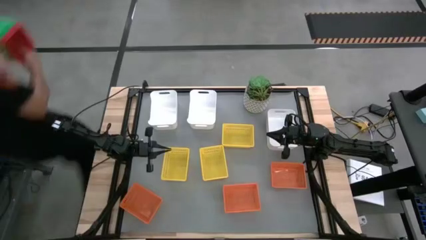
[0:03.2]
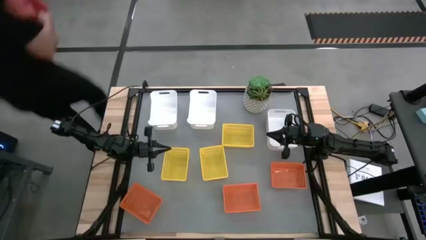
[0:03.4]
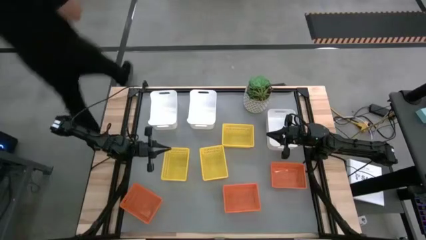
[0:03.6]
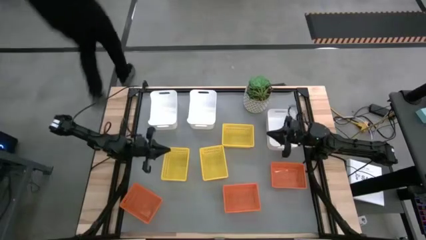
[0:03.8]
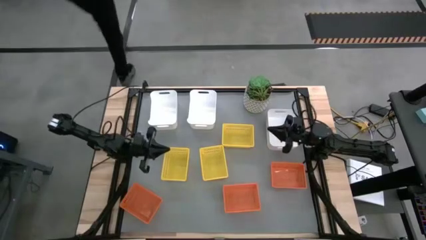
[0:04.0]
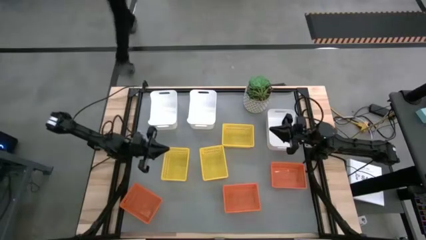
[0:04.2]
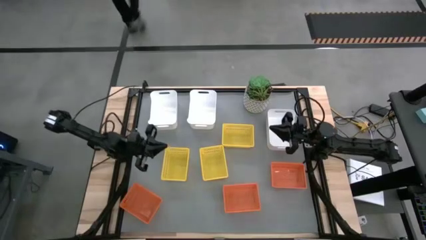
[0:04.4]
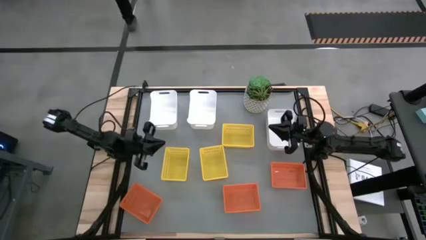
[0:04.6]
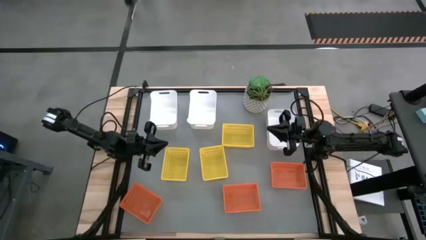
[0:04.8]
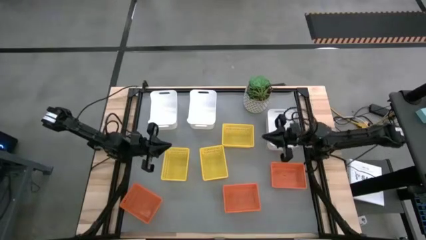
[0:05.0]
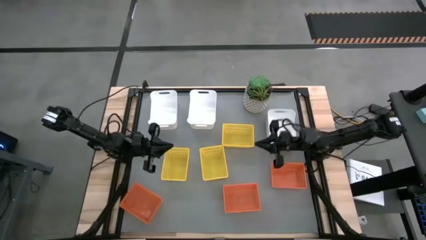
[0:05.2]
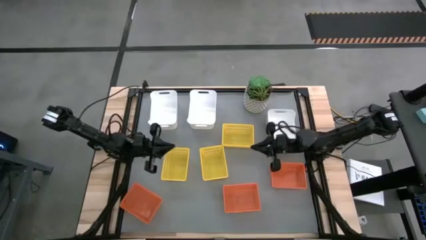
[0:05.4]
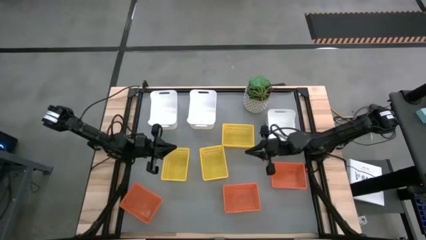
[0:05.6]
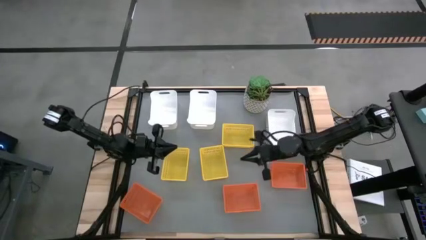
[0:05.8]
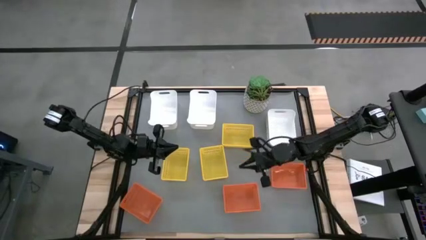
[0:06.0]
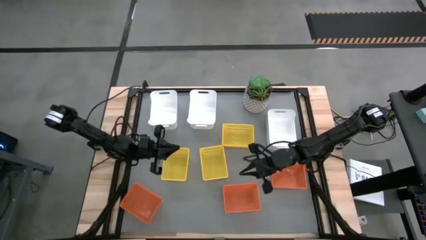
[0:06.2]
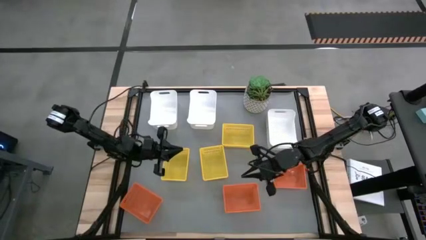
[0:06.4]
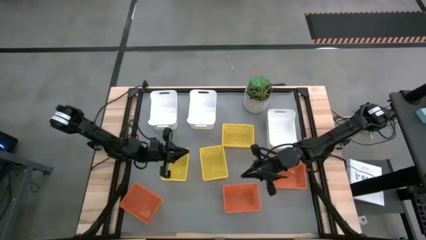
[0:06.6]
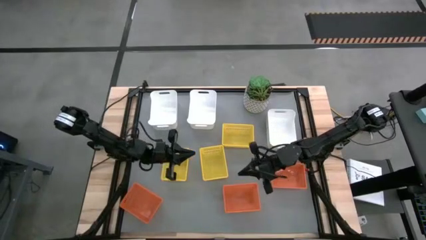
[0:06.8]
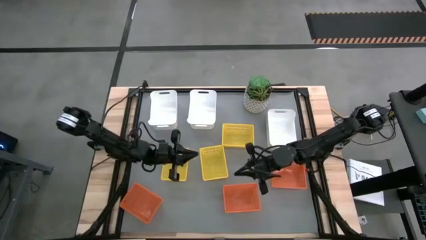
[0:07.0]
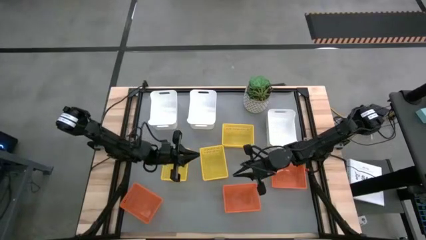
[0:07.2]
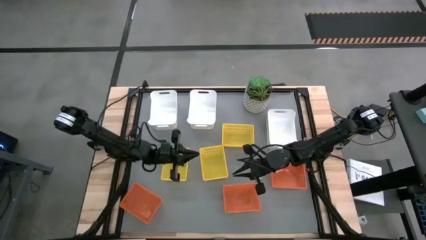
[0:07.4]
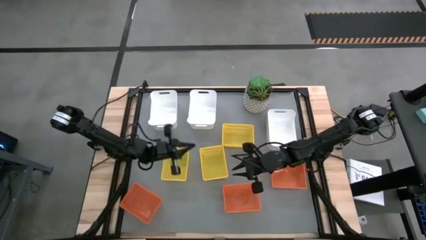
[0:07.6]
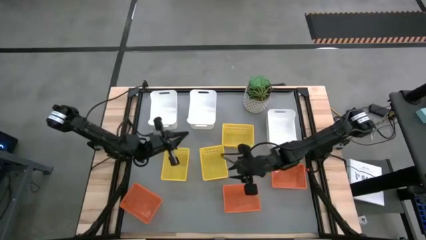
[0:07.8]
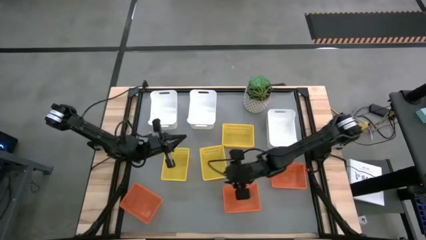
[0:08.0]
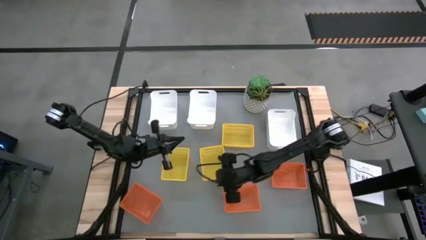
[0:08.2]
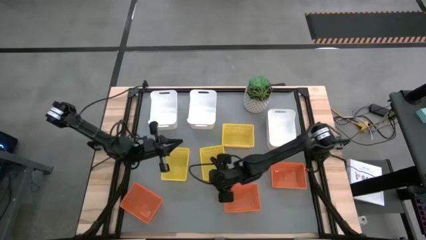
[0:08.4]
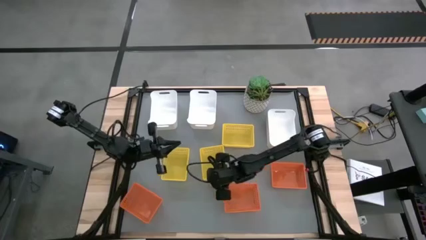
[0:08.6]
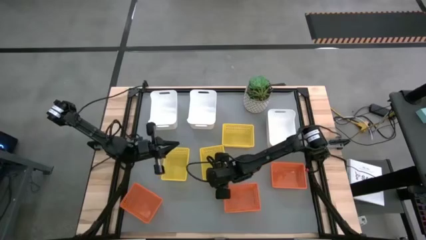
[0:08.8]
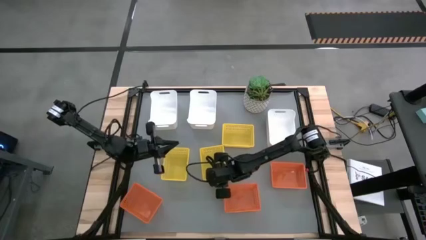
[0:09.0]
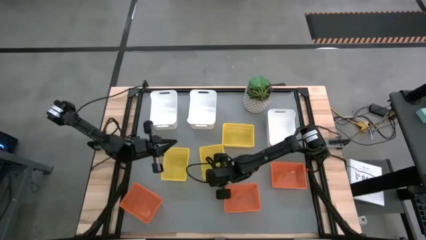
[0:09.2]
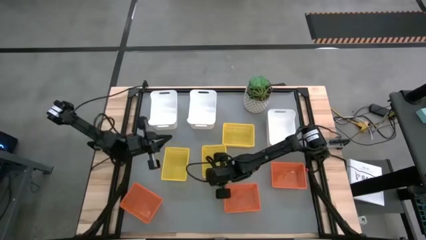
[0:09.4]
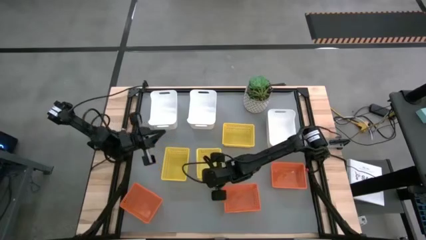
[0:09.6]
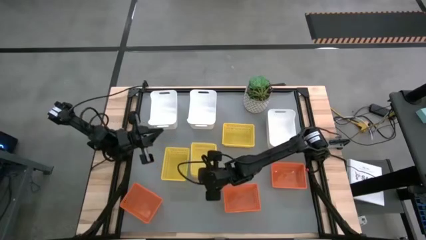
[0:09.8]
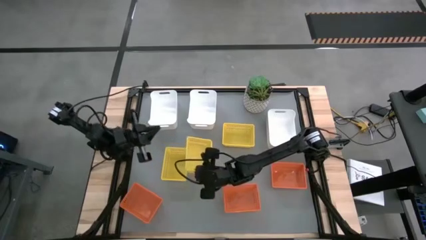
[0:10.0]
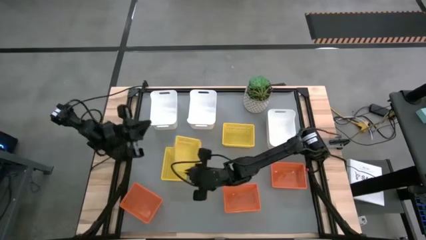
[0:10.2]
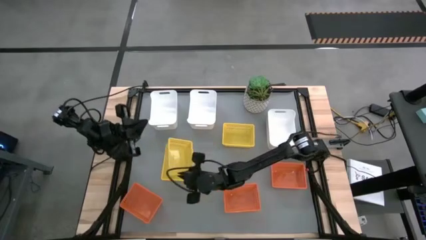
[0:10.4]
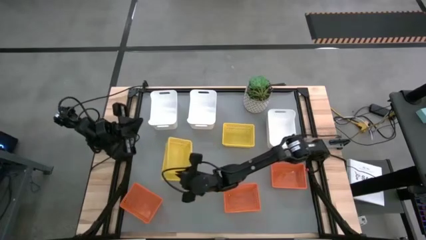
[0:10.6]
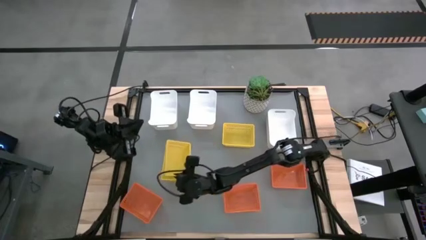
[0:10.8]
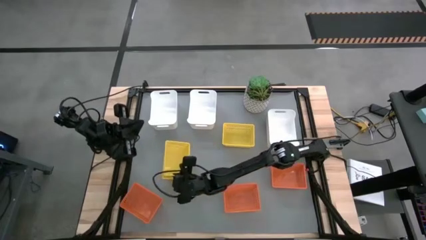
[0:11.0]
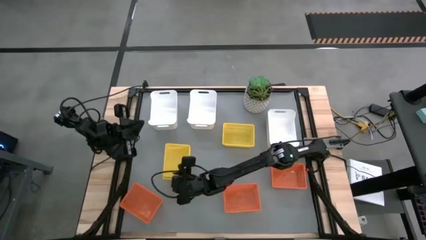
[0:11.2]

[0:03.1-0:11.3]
Stack the bottom right yellow bin on top of the bottom left yellow bin

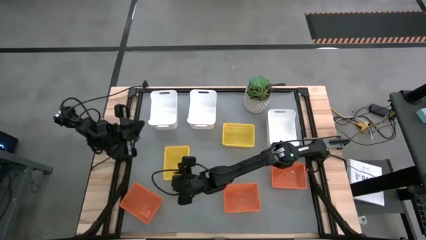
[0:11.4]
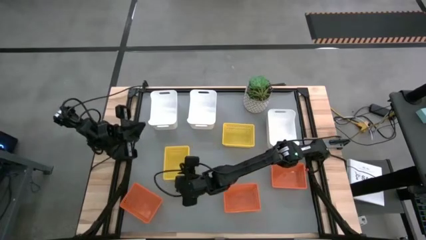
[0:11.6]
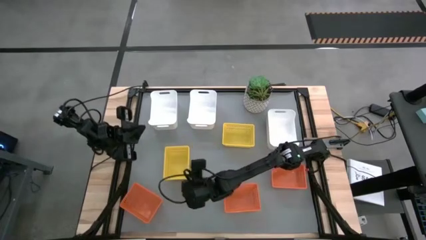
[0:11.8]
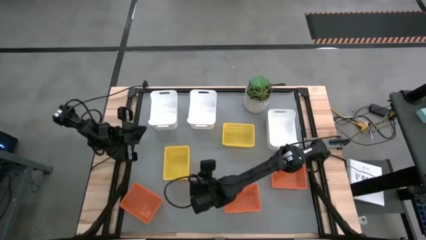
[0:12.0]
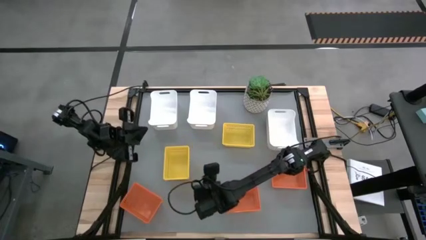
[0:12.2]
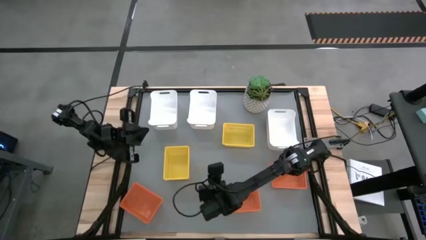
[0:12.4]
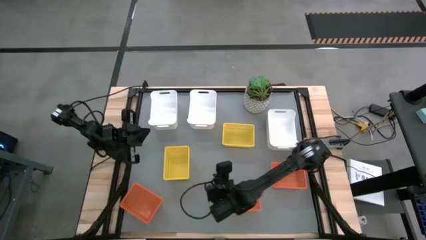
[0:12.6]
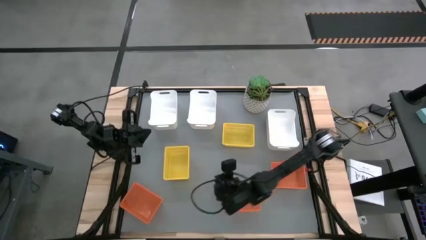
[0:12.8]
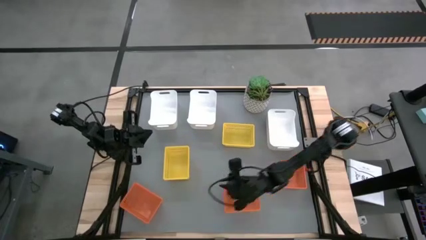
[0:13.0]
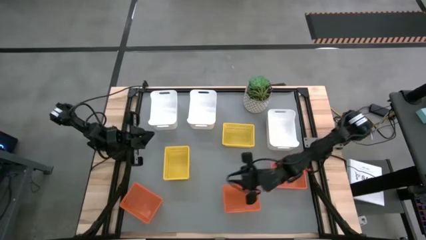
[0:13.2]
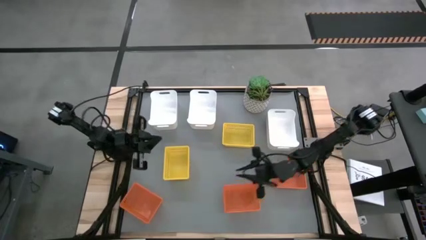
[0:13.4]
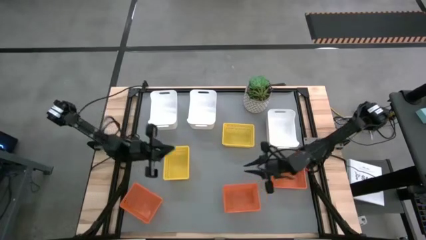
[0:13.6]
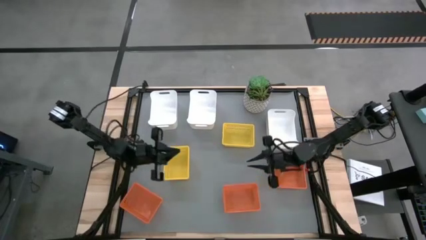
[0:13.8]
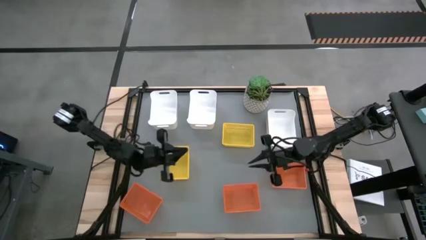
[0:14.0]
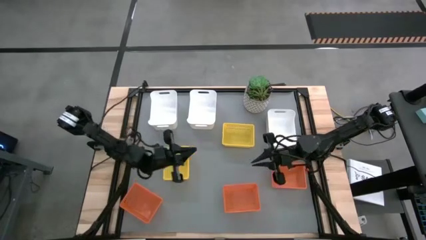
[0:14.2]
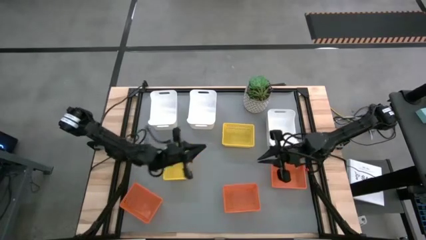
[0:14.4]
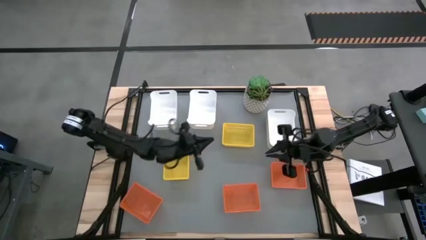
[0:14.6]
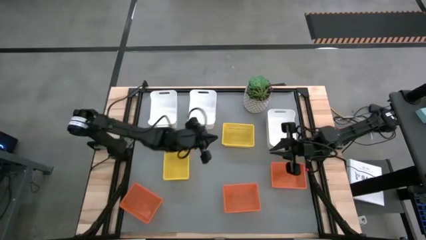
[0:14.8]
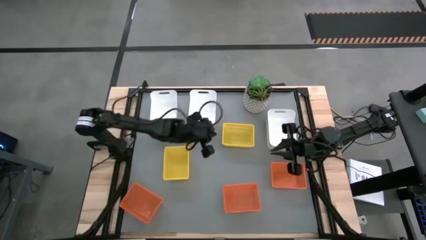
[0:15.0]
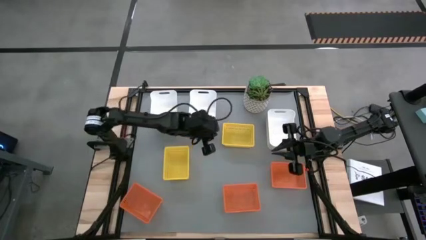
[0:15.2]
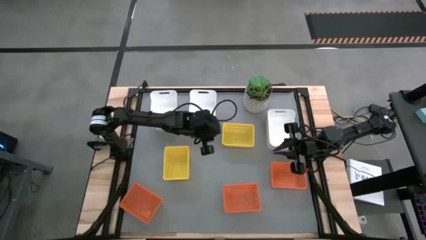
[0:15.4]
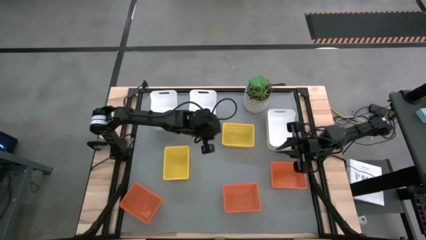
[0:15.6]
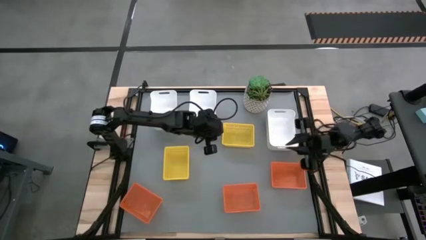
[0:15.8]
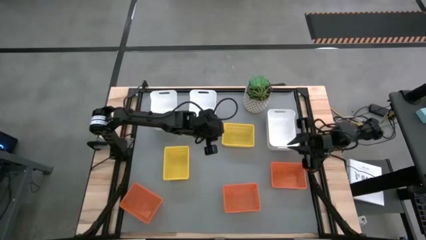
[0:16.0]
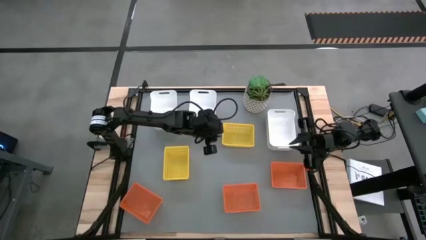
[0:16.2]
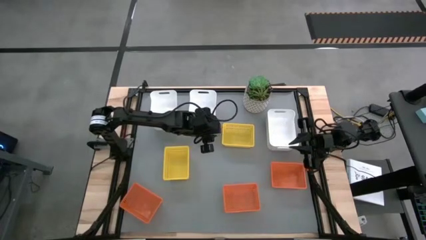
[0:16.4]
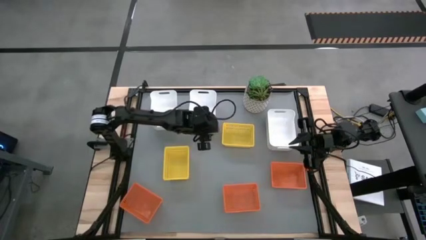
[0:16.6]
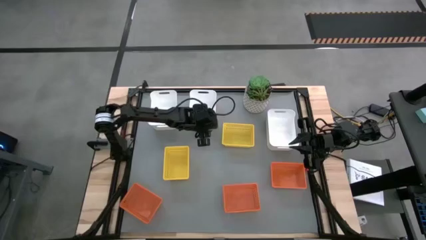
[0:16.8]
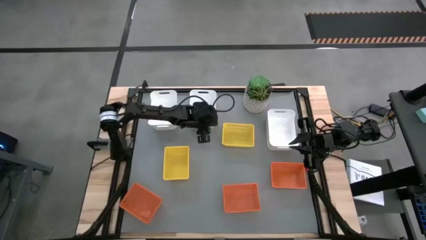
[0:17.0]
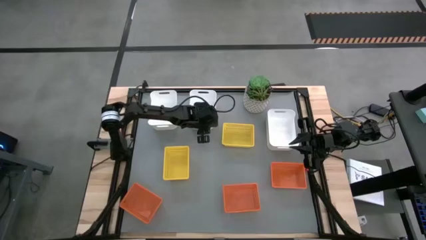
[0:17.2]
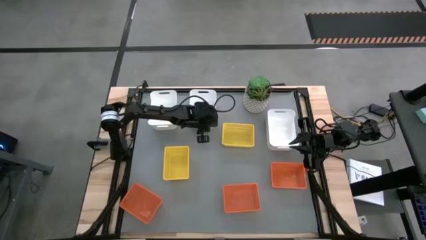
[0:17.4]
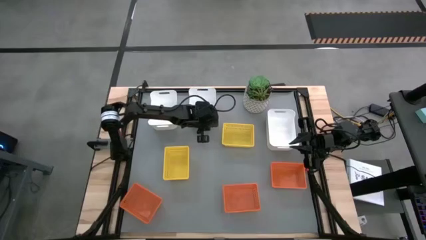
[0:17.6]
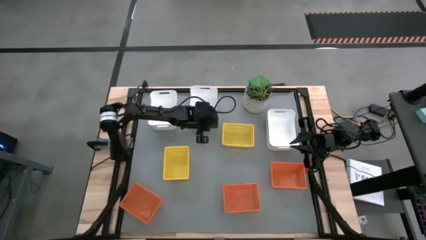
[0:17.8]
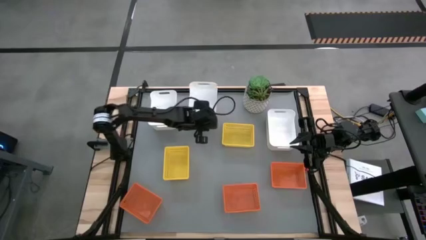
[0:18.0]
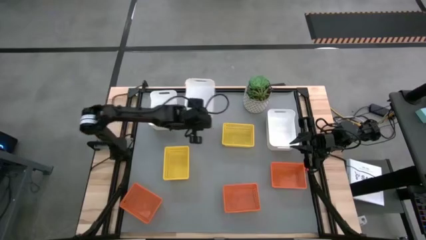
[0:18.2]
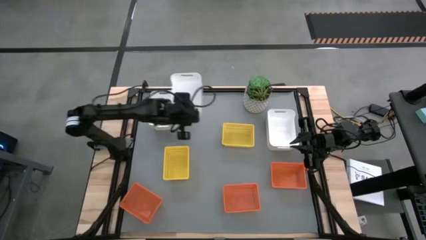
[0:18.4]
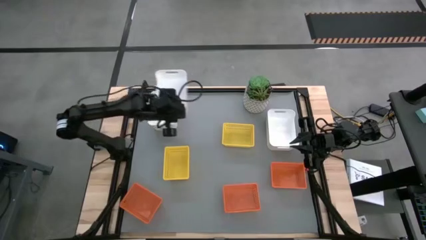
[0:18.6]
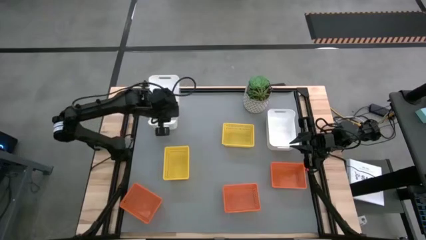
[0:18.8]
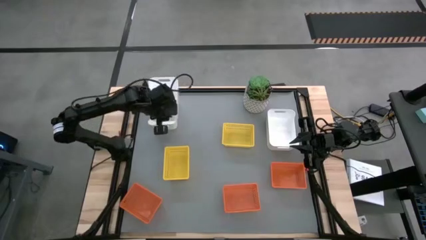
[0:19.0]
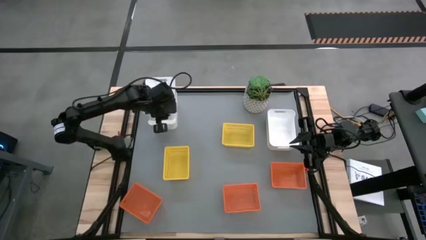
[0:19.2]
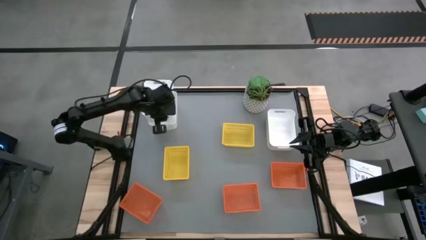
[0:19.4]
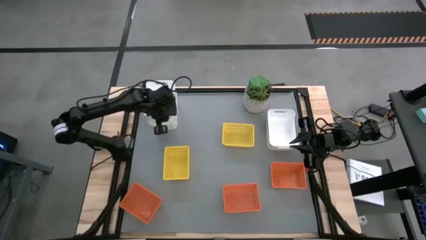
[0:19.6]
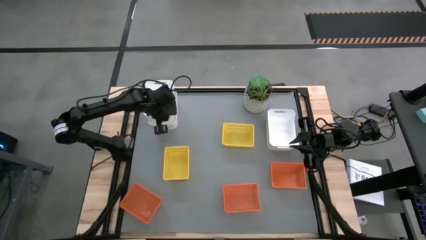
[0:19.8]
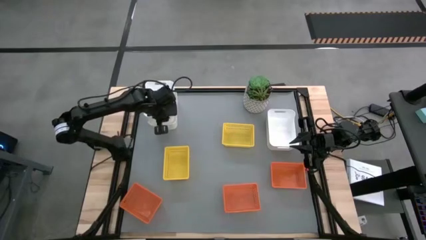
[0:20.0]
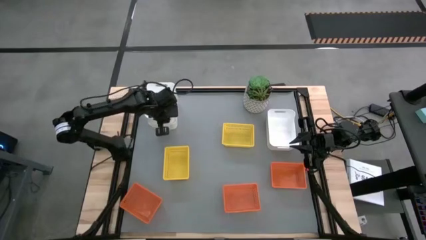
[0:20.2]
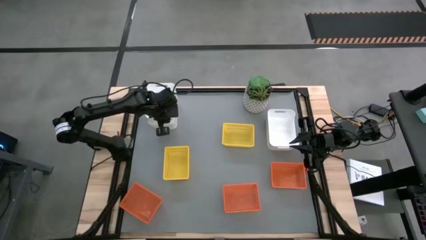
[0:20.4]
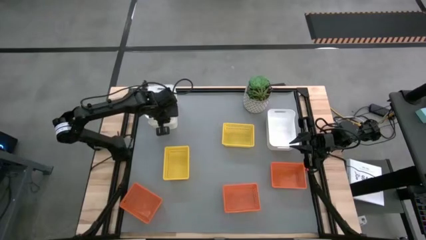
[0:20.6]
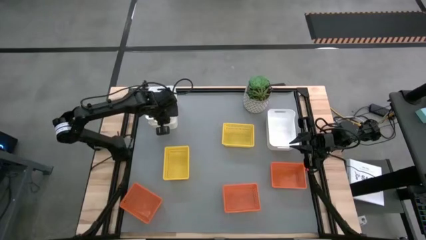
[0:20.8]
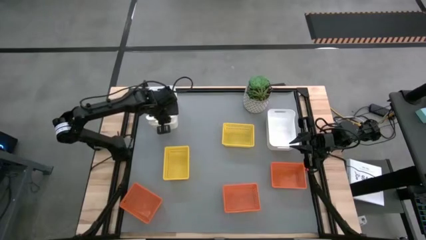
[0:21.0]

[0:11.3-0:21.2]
Stack the middle white bin on top of the left white bin
